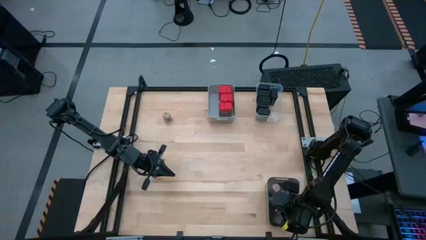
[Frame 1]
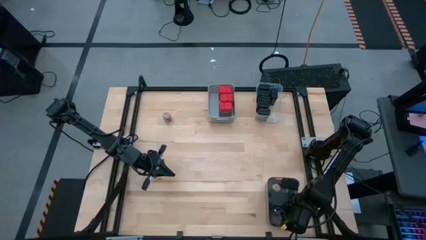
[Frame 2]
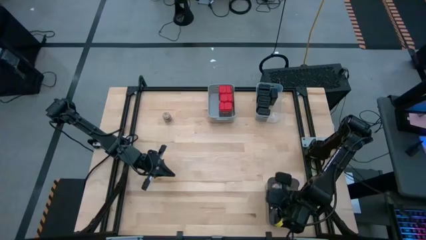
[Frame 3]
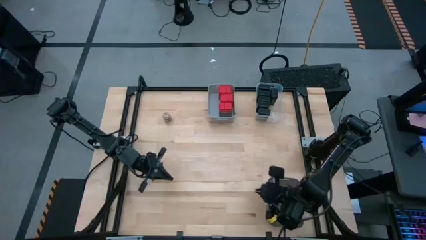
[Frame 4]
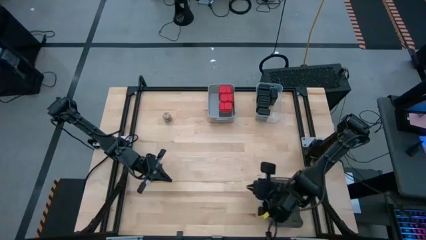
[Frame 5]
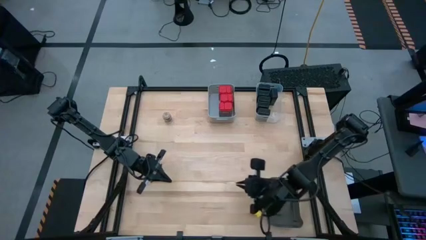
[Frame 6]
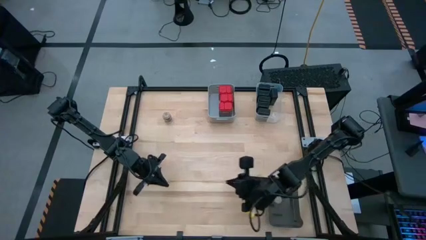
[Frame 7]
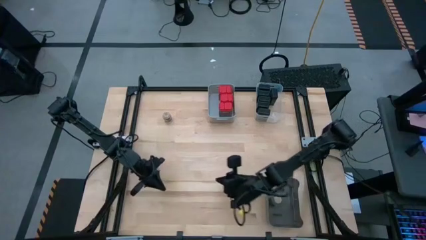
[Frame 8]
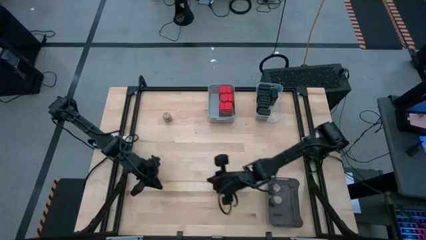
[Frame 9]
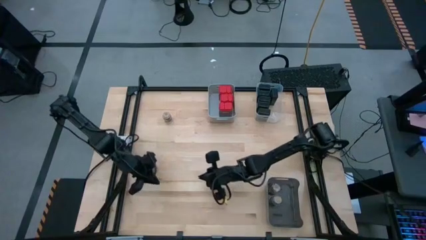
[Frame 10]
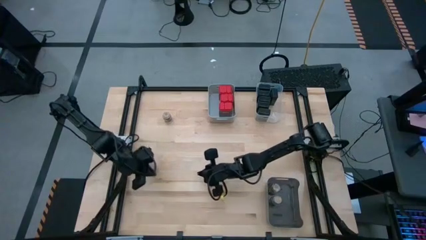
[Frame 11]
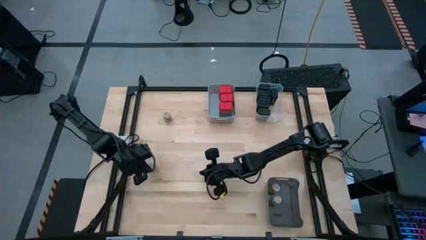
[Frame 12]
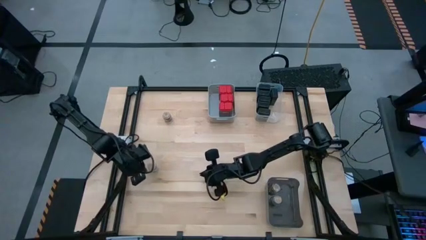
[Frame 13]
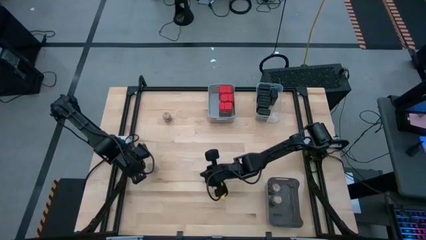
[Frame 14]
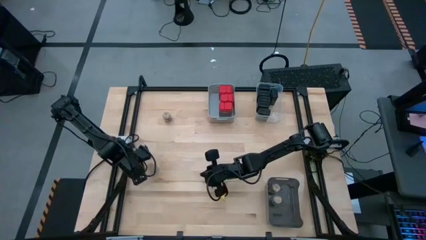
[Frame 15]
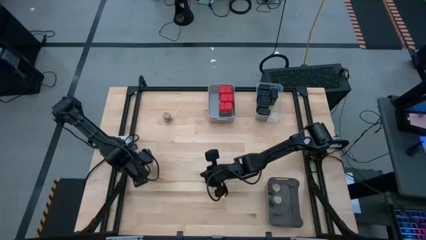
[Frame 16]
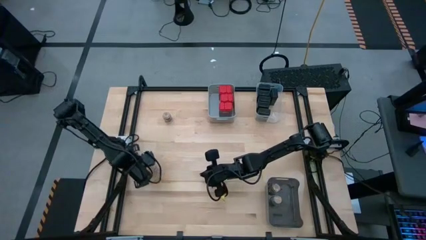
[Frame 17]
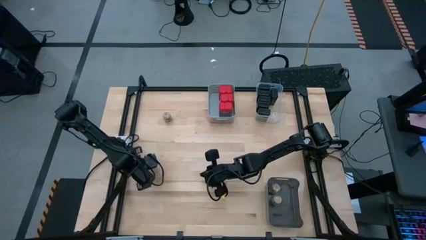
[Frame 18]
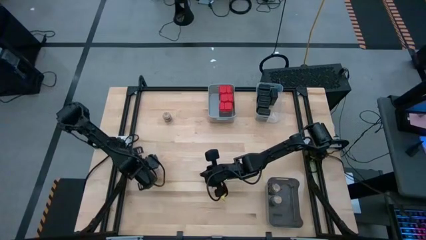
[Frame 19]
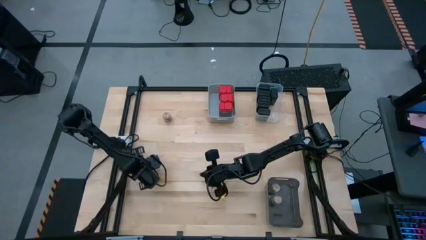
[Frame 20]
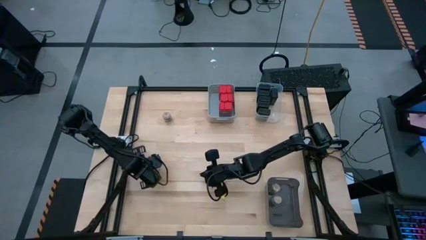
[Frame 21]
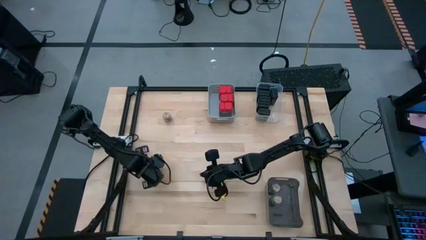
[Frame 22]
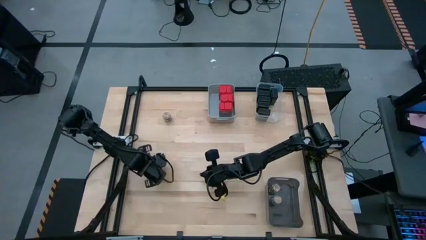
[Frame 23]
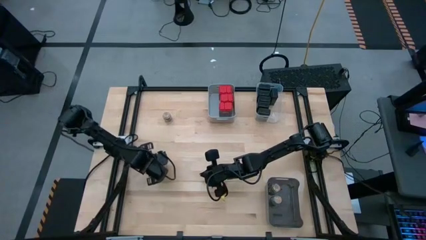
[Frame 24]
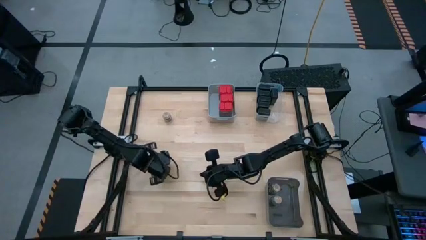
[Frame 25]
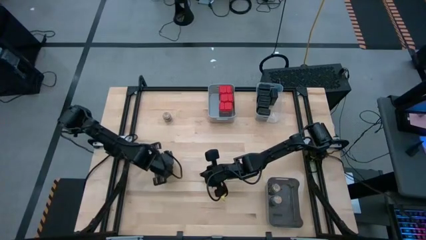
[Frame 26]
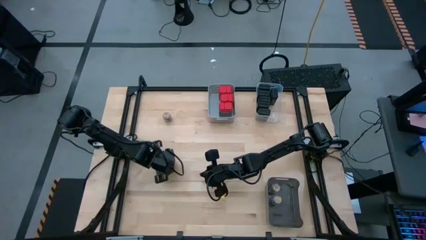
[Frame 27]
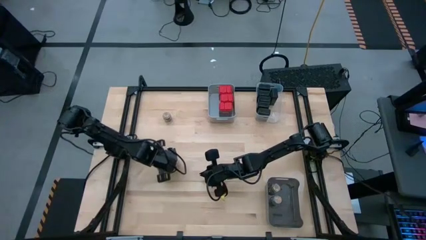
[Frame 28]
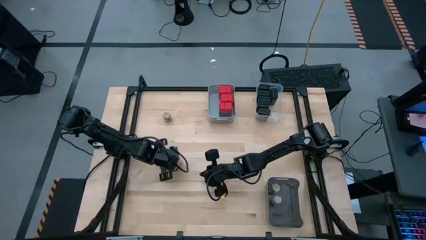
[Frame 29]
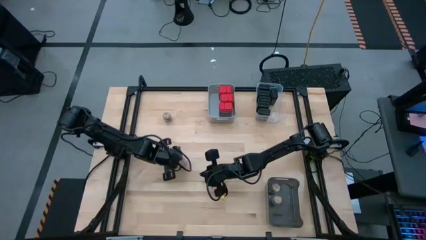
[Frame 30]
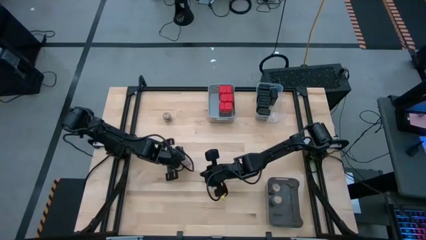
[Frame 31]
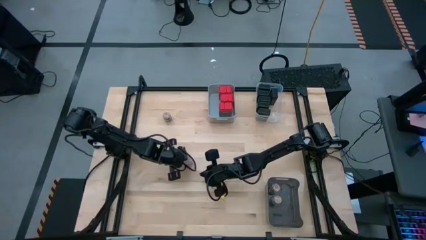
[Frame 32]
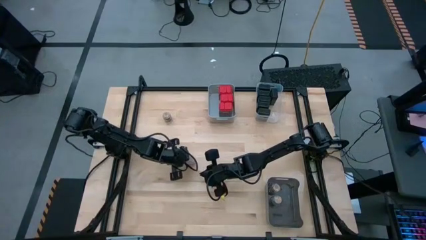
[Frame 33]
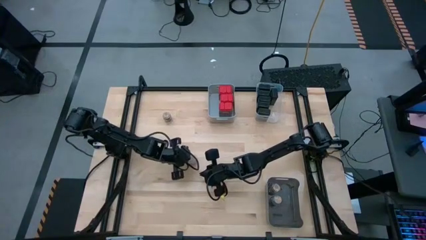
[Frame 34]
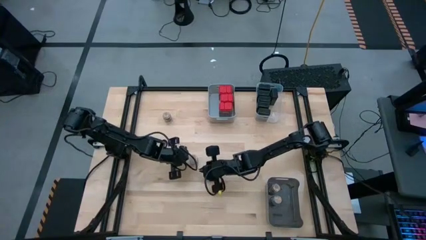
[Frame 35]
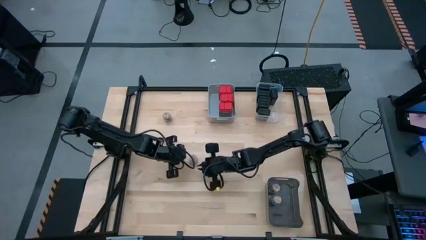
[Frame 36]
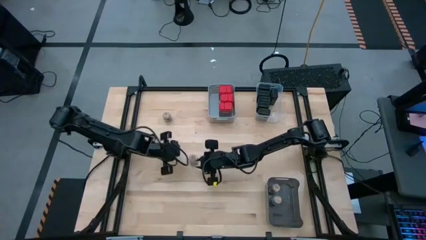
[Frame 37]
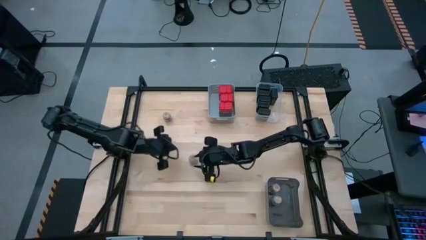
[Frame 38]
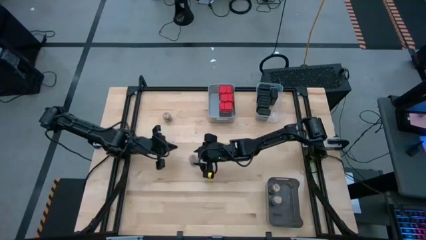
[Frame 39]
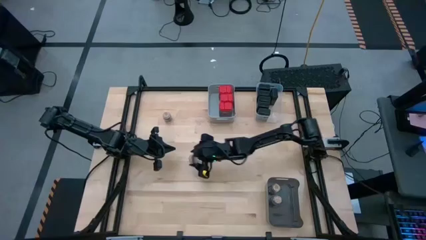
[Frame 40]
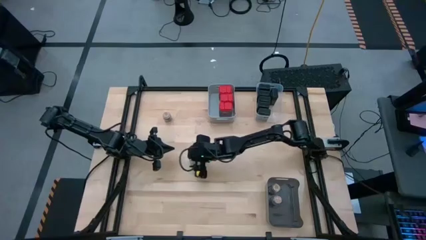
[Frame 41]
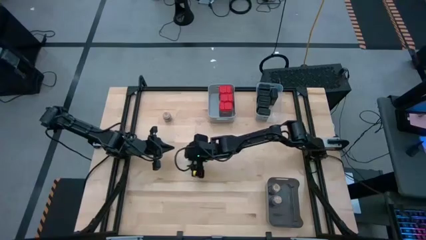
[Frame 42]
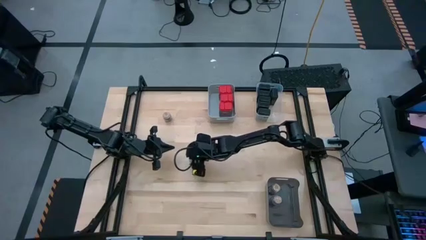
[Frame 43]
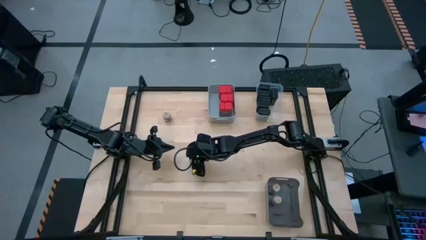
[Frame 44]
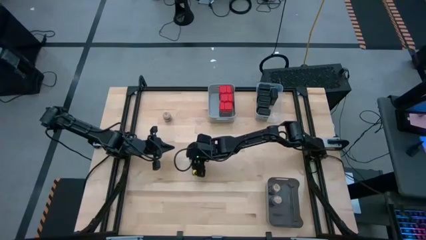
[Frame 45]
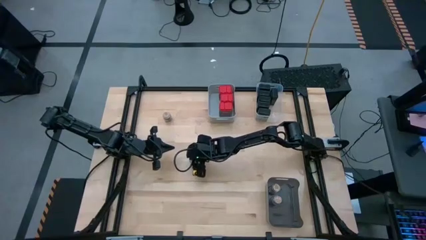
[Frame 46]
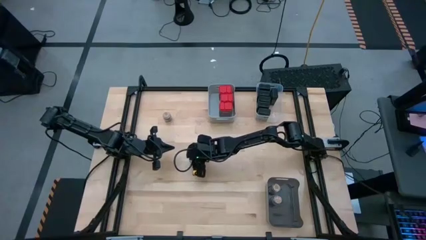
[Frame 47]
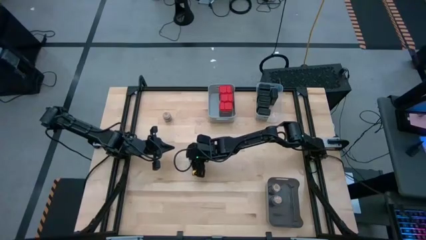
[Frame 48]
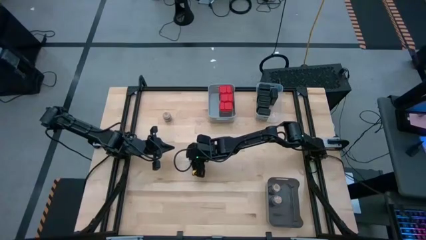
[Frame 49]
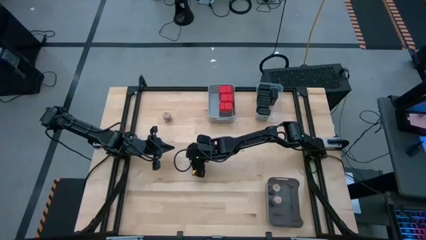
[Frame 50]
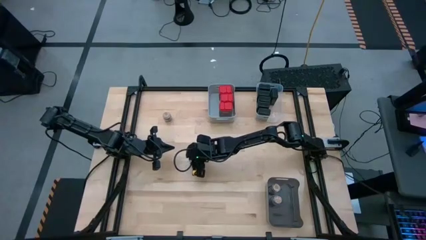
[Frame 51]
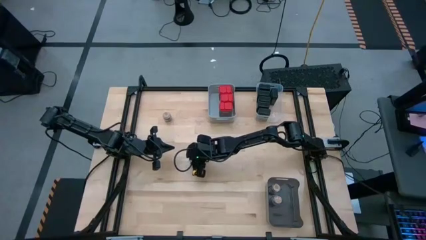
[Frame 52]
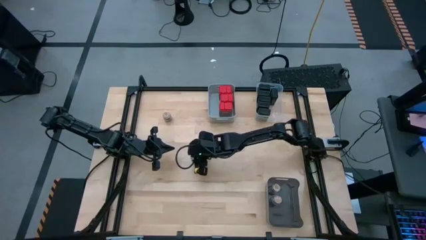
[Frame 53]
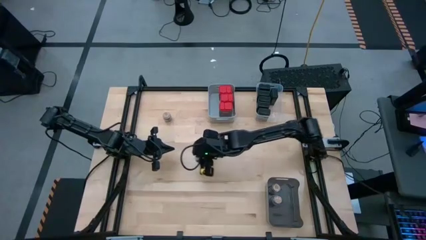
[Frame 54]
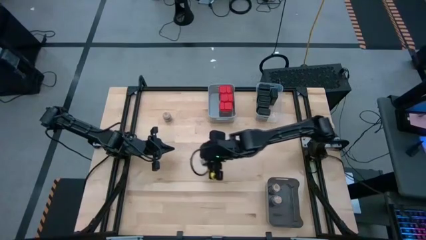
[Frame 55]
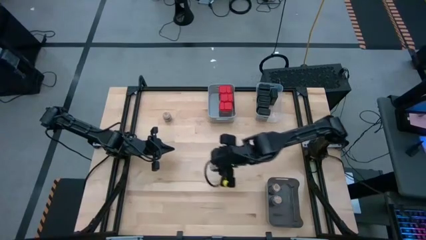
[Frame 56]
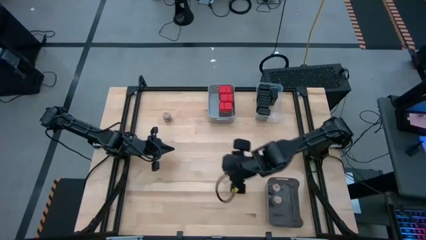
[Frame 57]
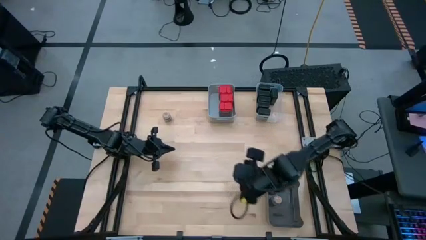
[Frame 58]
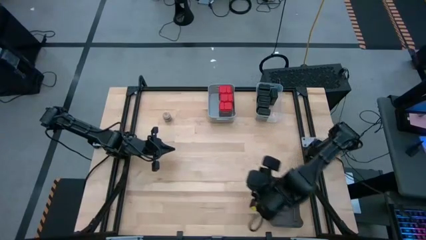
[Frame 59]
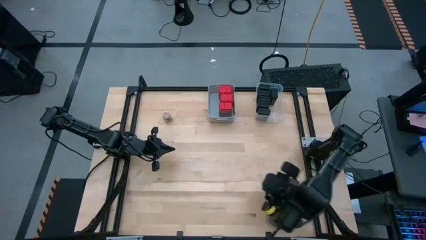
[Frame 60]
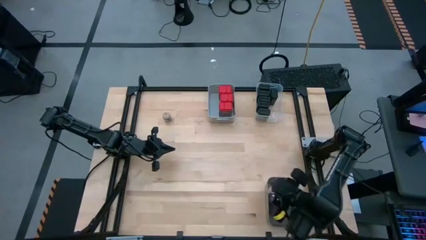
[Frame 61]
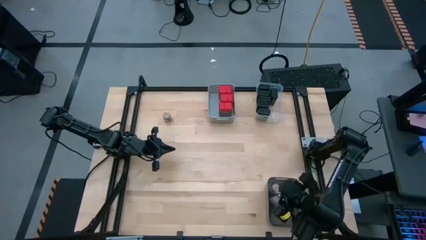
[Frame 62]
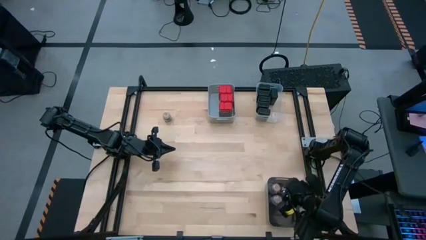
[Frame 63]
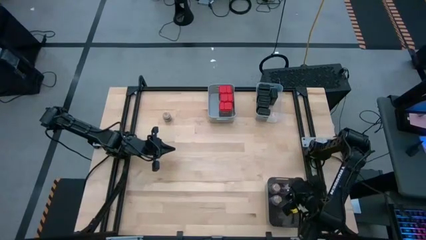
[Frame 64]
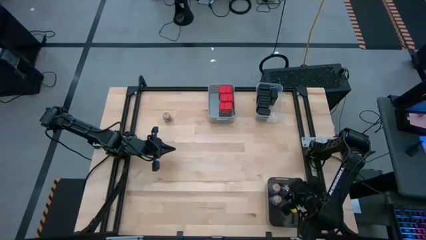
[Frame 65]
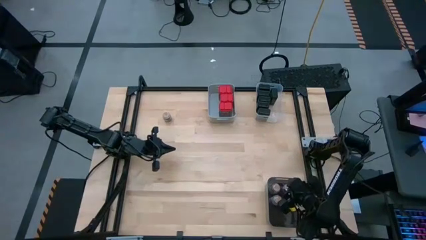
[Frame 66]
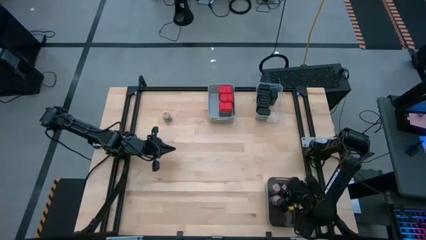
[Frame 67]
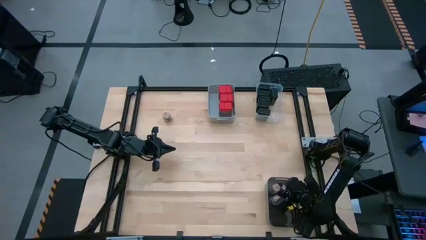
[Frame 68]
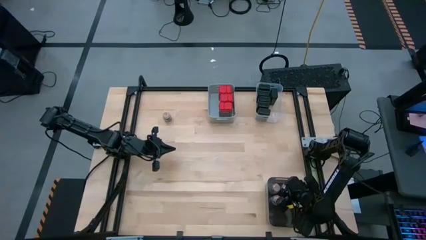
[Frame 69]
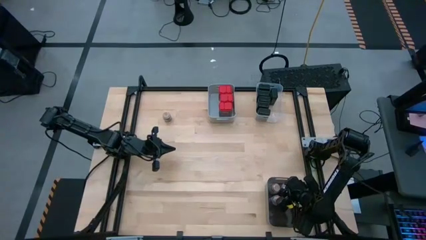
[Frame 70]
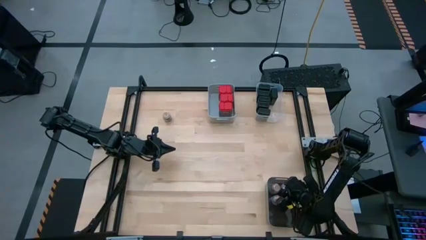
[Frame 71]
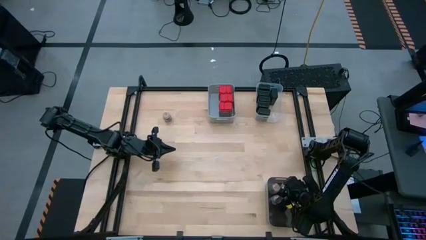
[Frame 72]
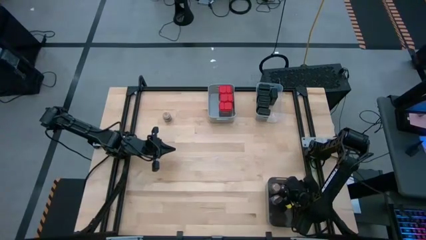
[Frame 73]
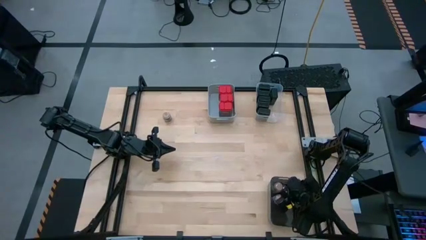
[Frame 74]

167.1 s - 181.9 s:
Task: Sort spices by type
Put the brown seasoning bottle into the black bin
